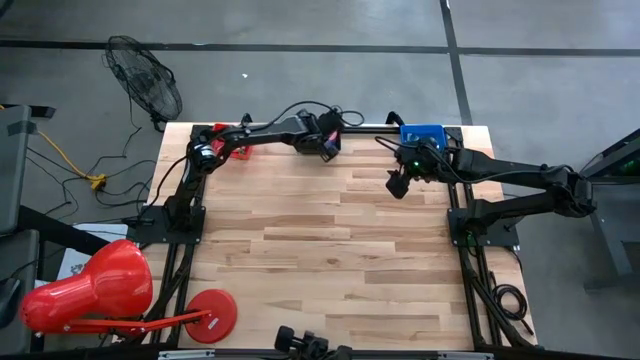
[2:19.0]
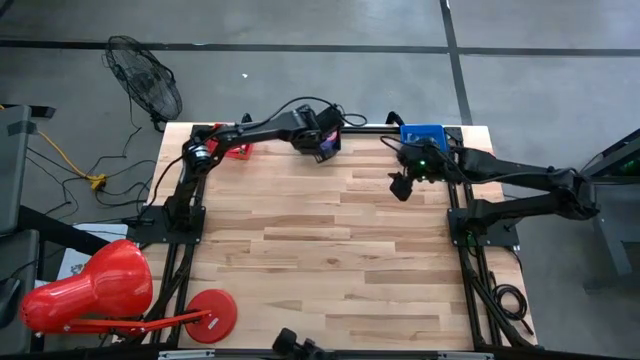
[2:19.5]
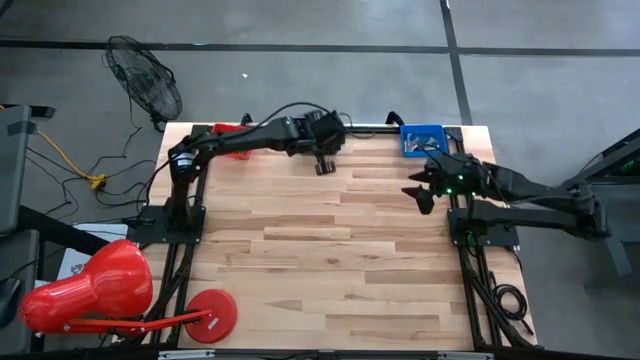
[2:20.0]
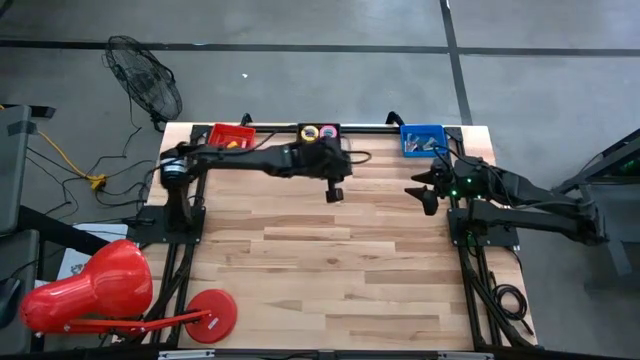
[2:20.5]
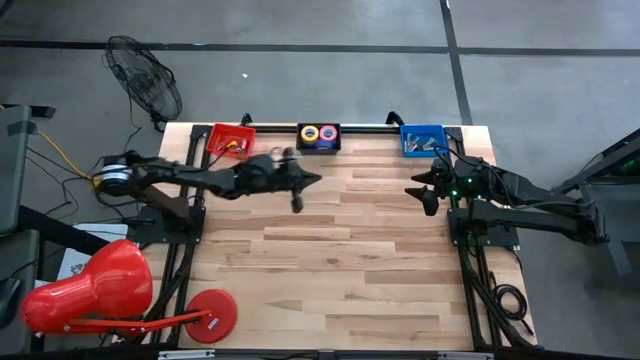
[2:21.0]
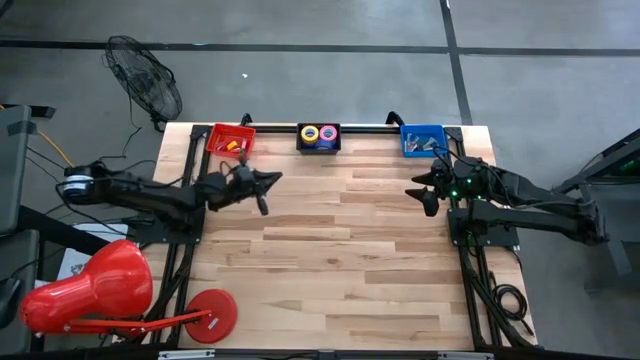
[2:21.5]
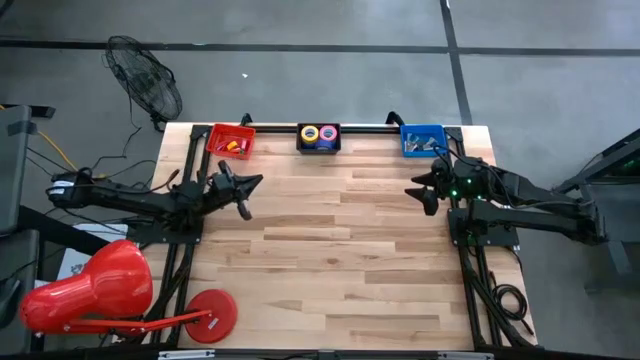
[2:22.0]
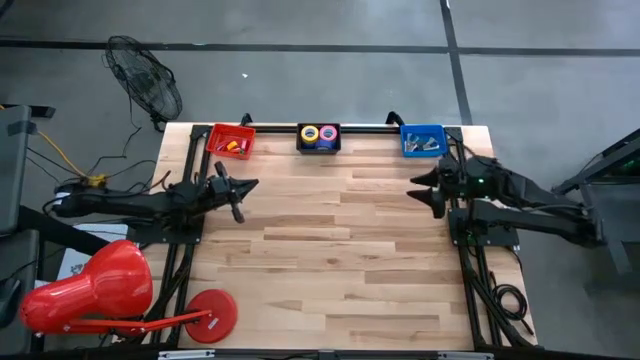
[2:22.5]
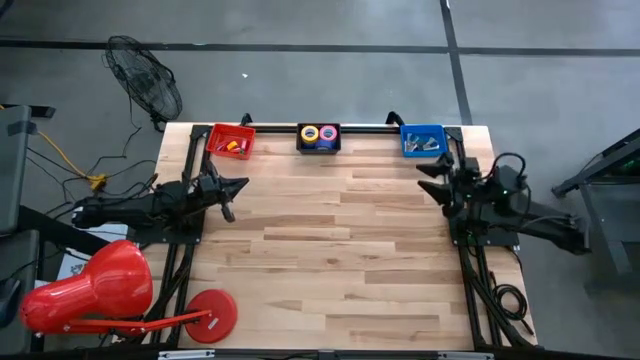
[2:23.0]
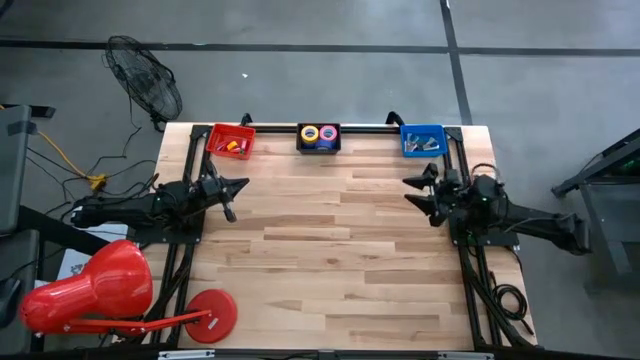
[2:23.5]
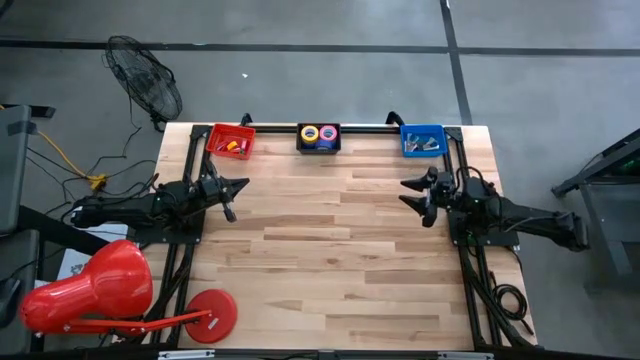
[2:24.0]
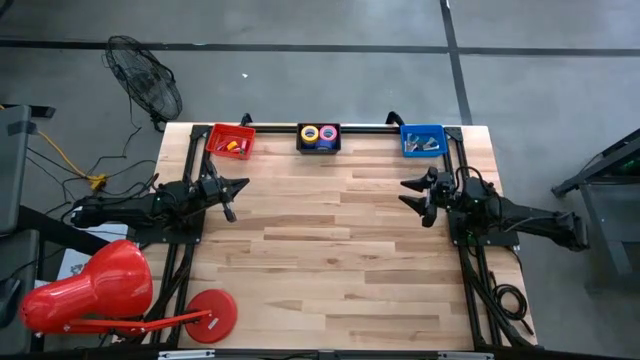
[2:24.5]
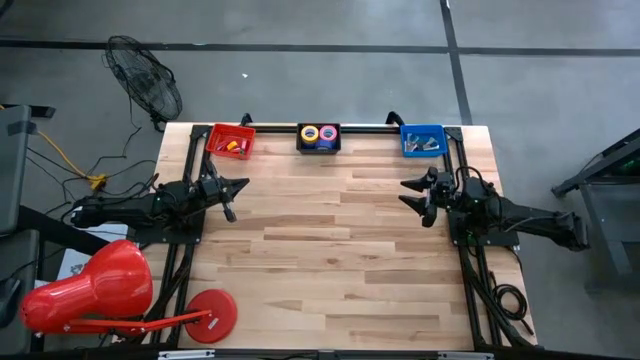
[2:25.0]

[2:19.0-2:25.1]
Task: Pick and place Stapler, Stapler remover, tape
Return to Home Position

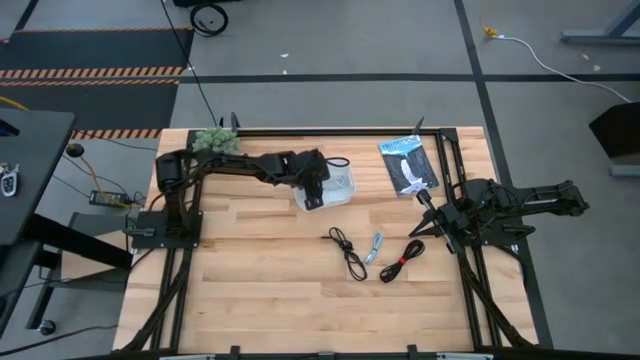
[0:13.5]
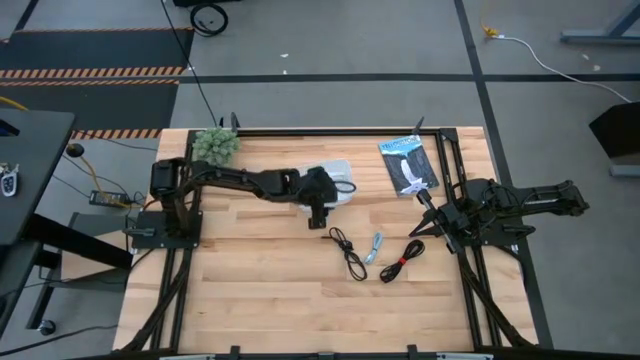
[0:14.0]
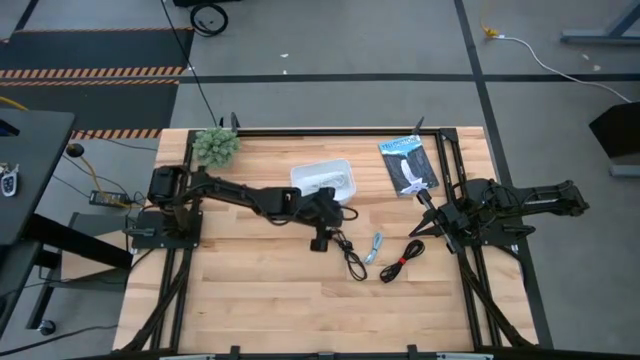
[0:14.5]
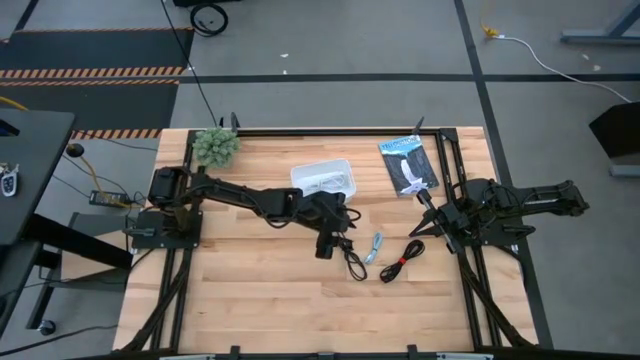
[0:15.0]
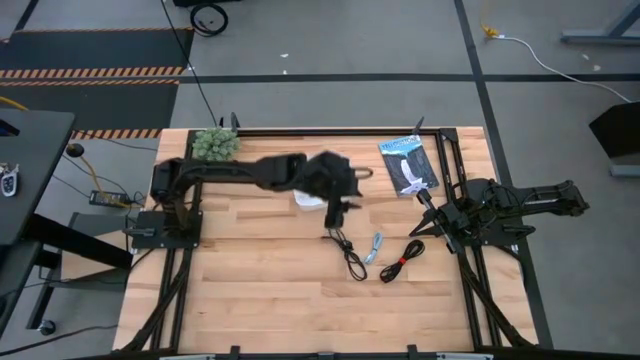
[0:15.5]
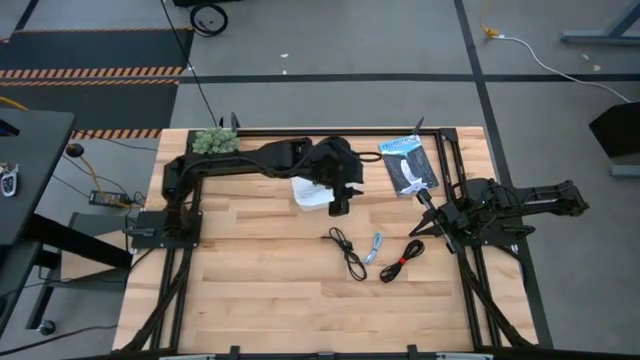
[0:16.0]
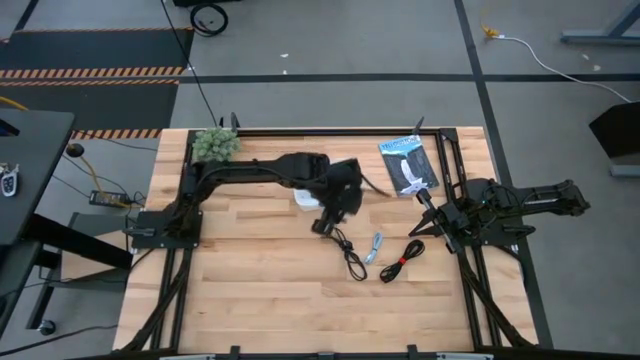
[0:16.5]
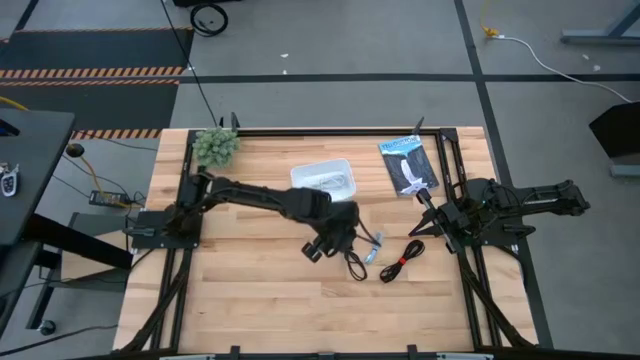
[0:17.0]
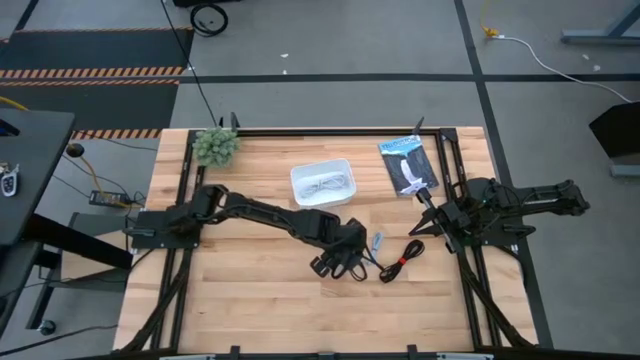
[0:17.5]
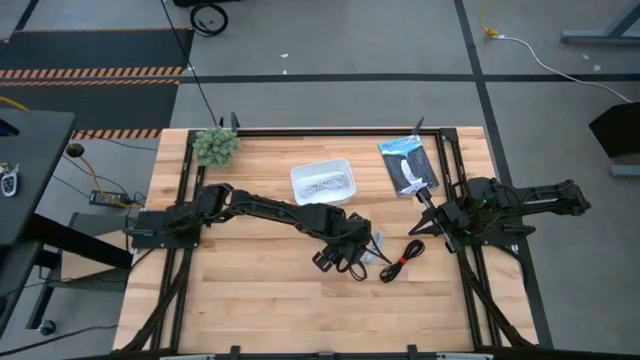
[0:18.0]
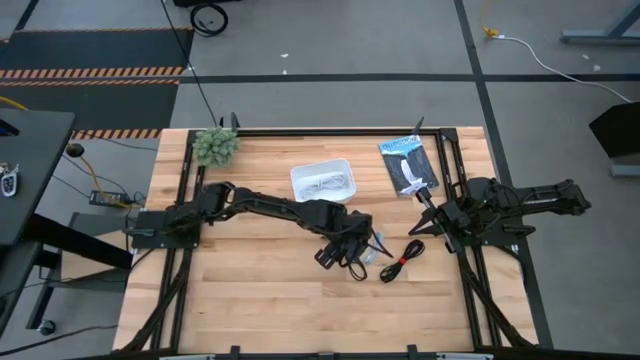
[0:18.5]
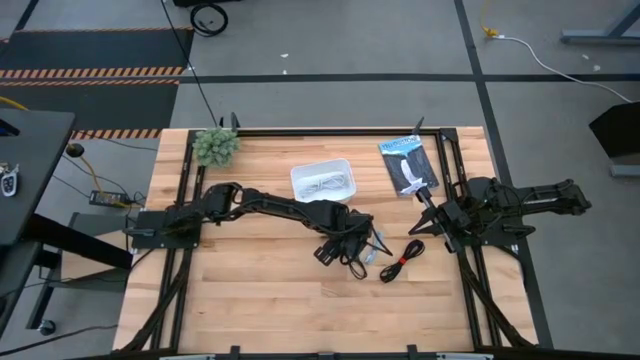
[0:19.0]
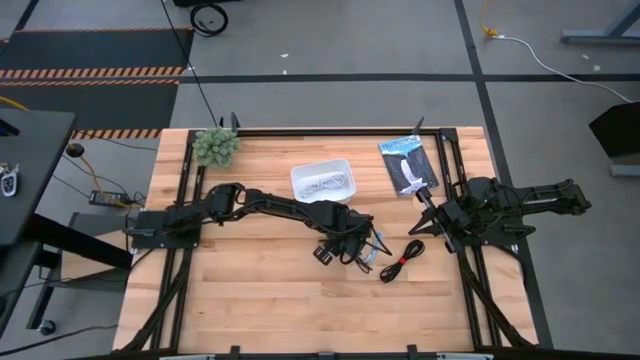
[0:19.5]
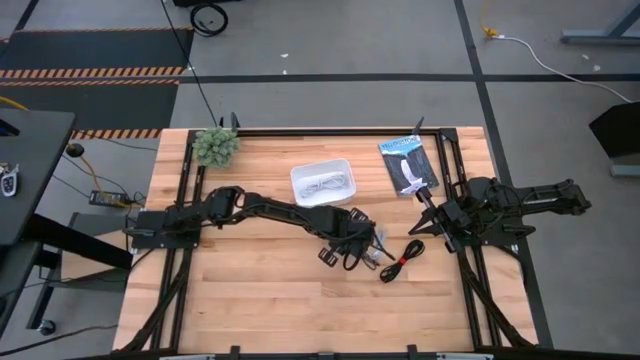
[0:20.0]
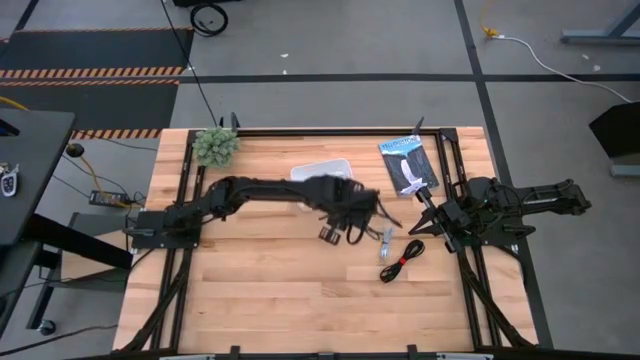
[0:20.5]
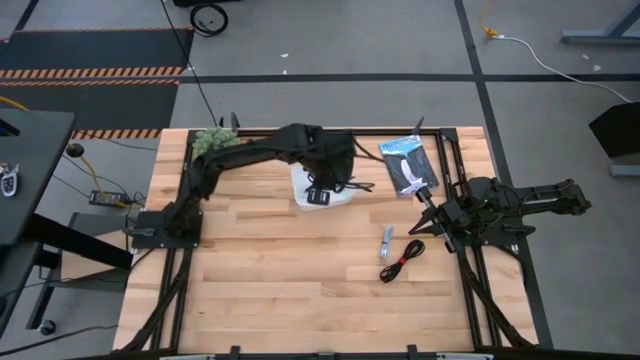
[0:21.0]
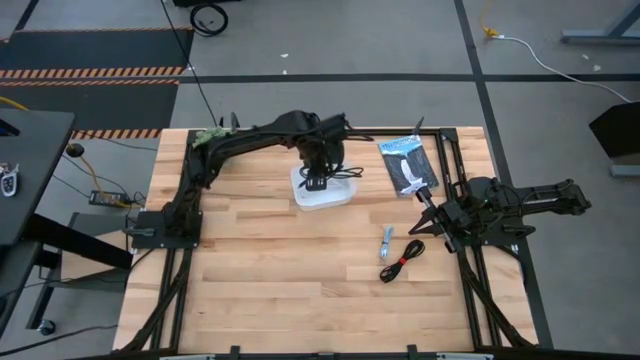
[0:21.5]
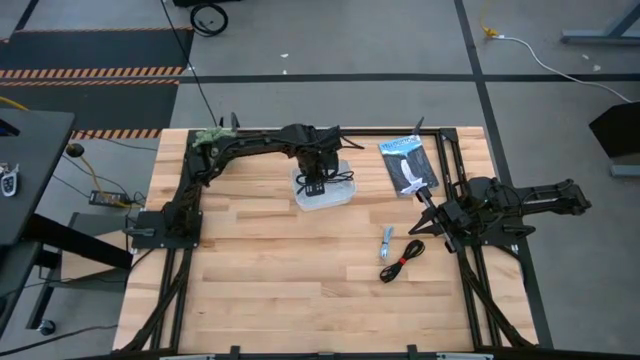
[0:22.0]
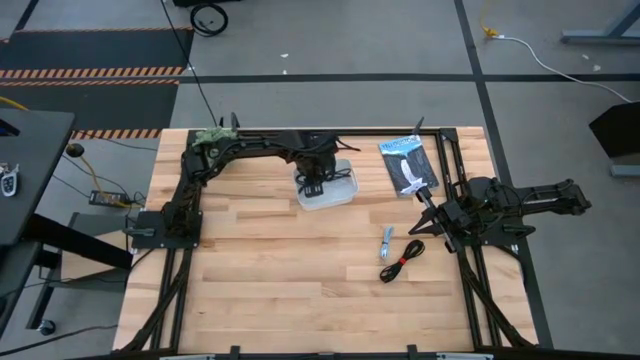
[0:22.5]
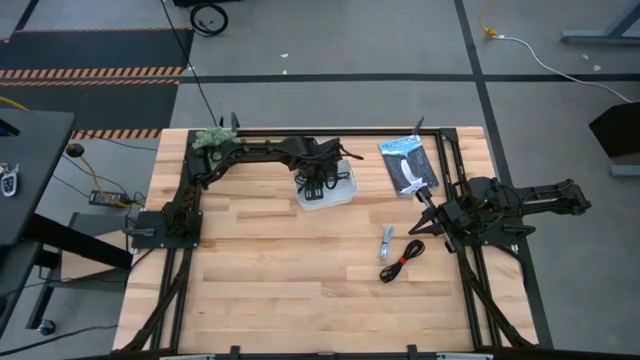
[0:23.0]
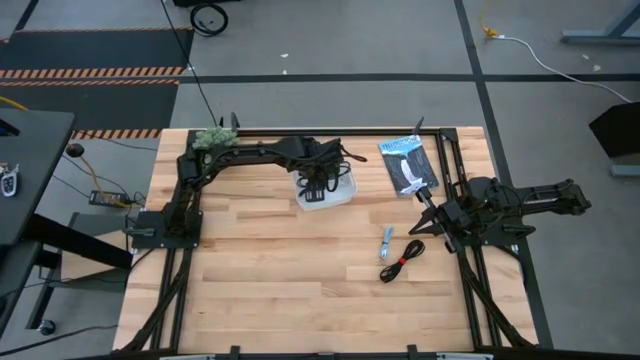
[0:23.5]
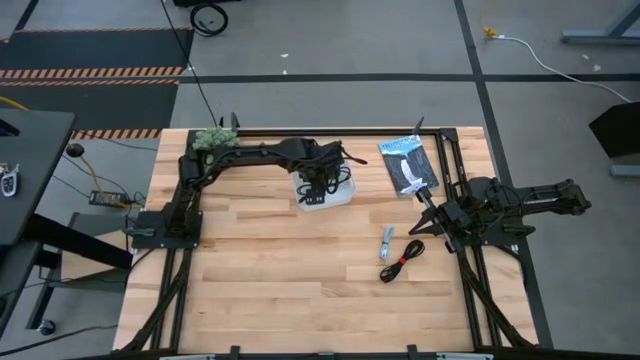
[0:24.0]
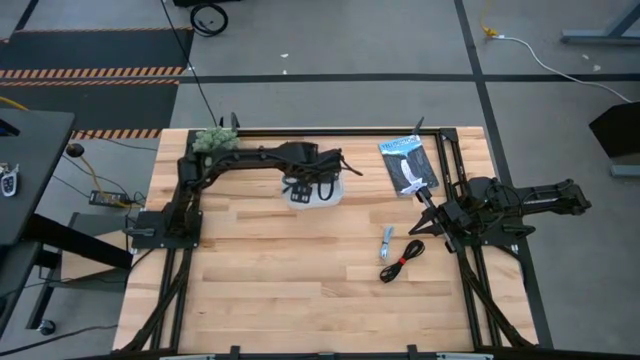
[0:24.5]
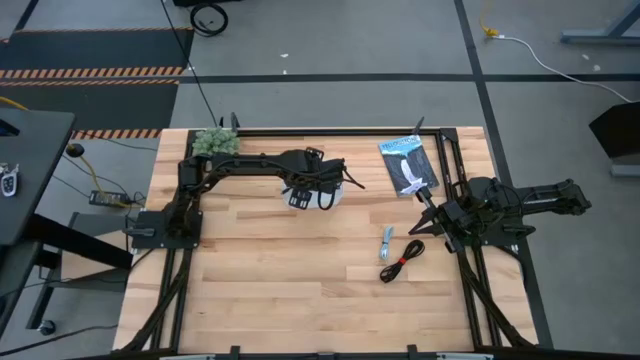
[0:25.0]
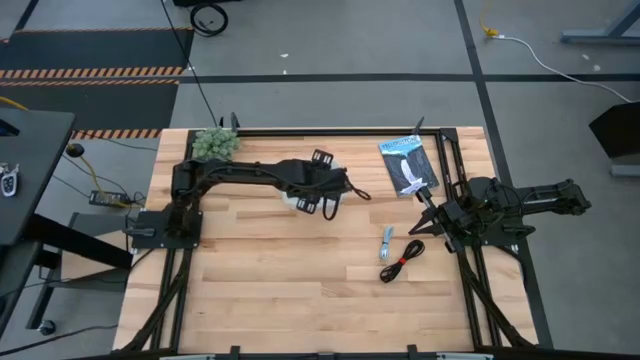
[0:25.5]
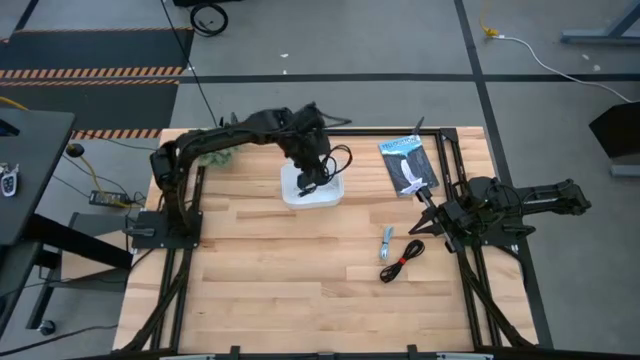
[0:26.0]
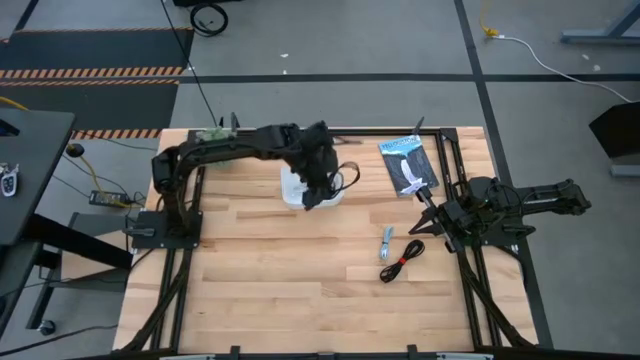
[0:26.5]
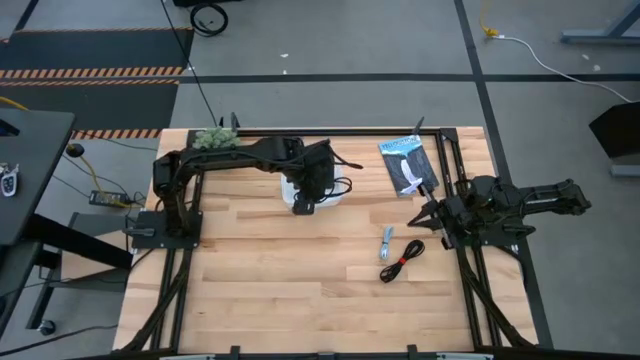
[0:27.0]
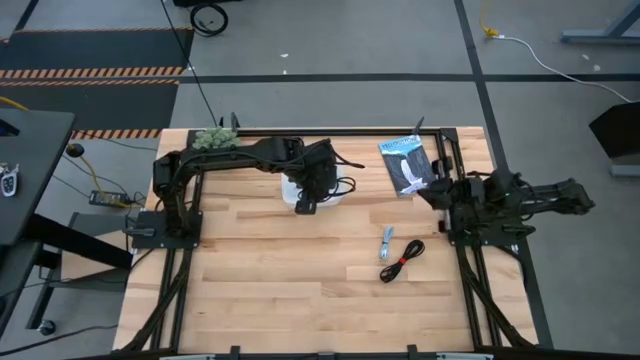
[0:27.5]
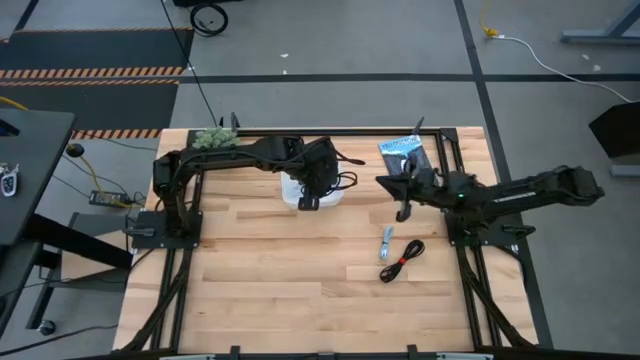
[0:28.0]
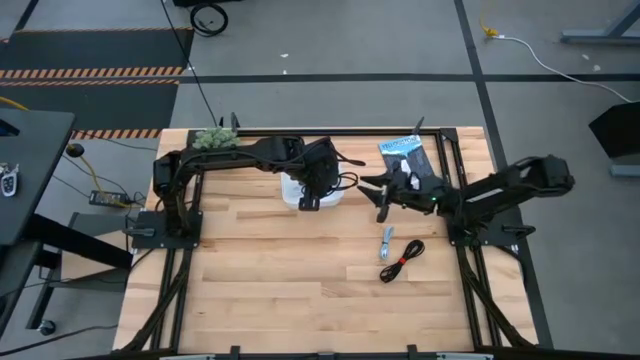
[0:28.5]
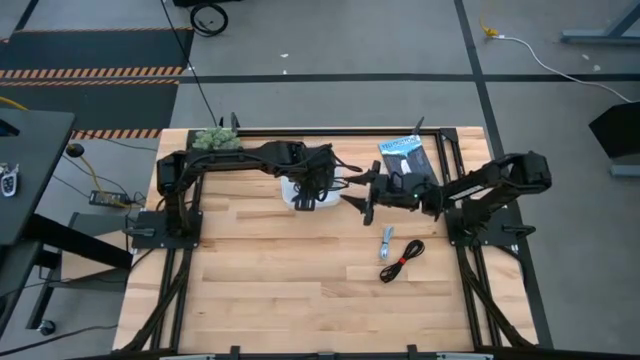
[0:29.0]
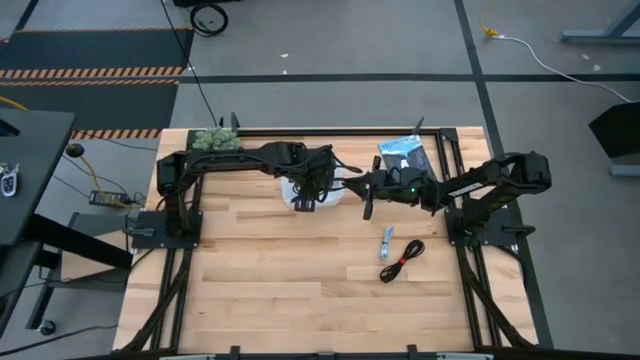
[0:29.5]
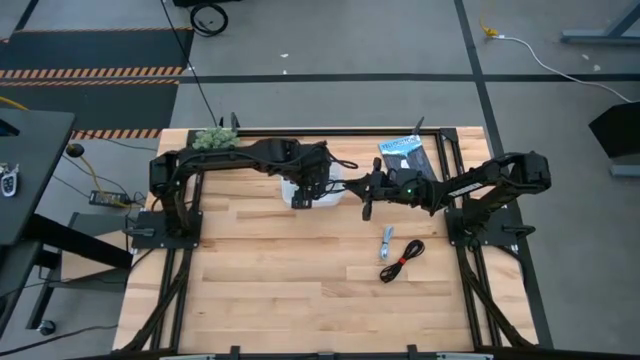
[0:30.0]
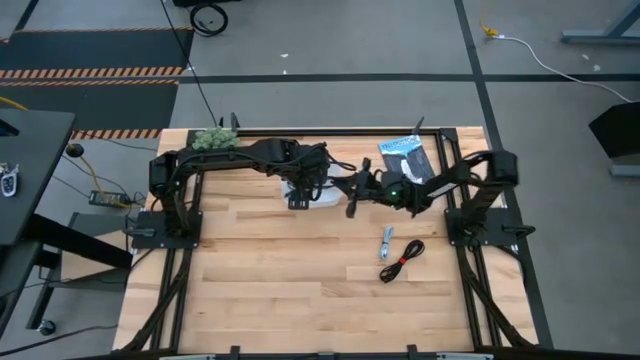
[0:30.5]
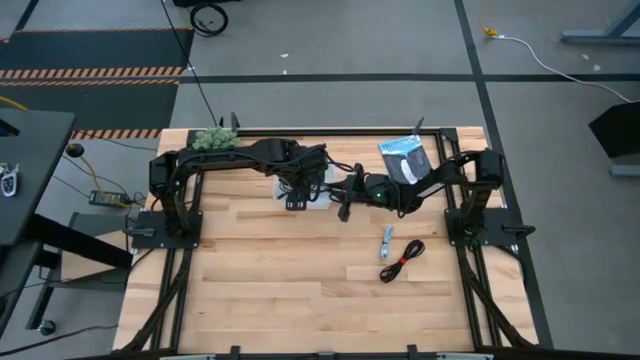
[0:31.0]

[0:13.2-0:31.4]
Task: Pick and place USB-C Cables
Put the left black charger cable into the white bin
